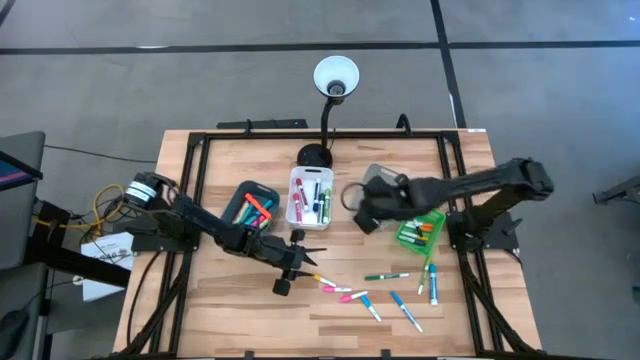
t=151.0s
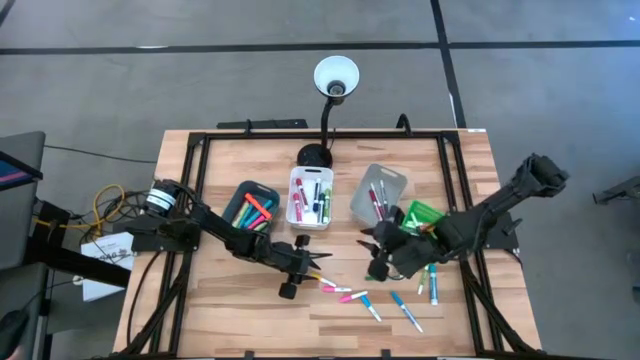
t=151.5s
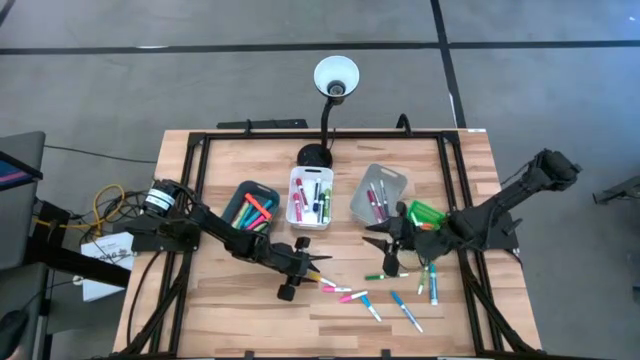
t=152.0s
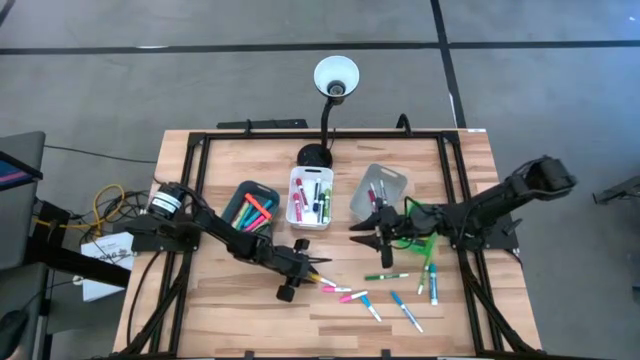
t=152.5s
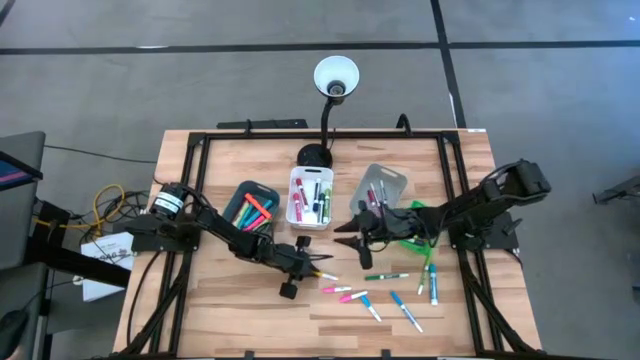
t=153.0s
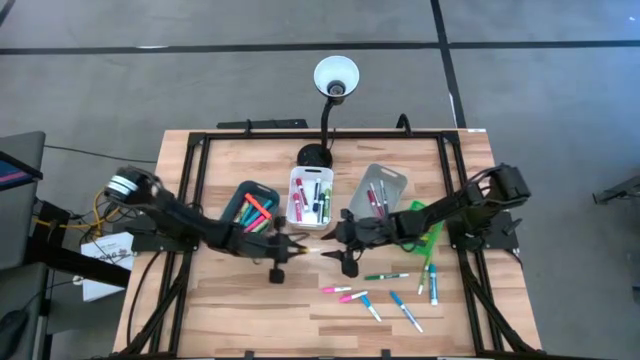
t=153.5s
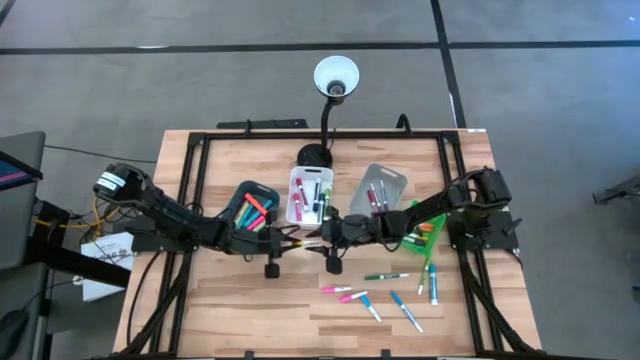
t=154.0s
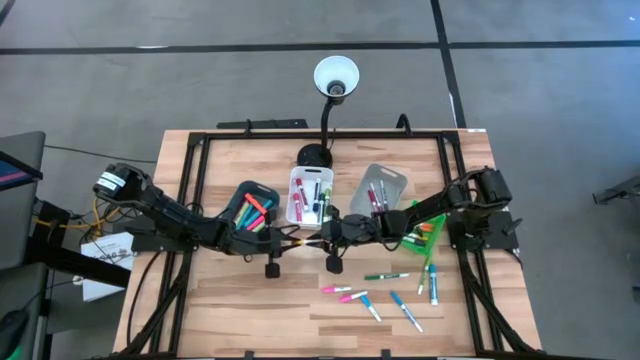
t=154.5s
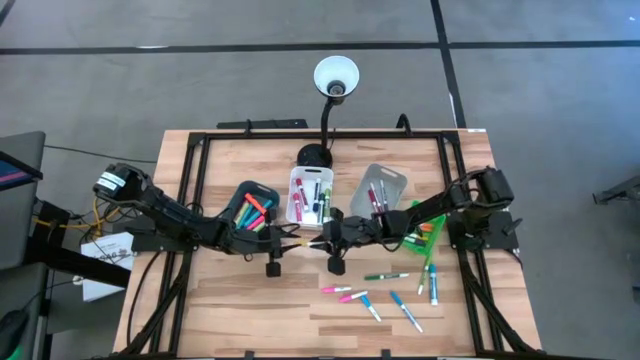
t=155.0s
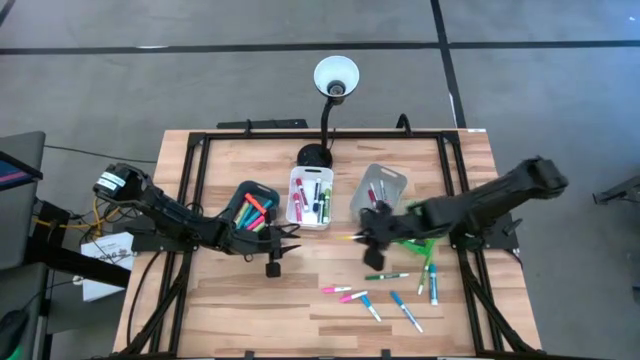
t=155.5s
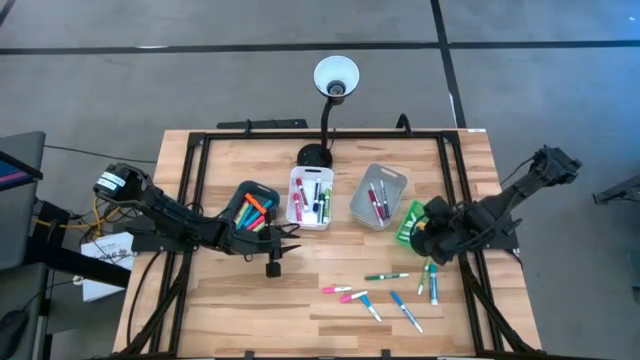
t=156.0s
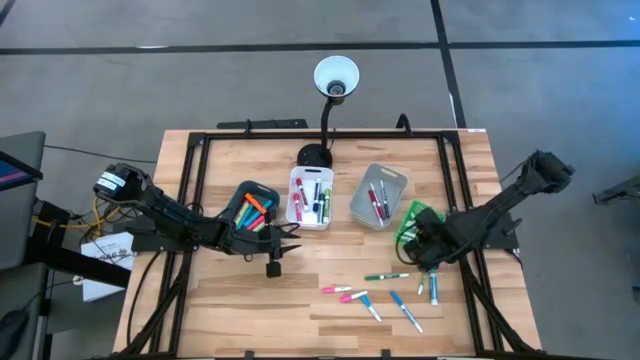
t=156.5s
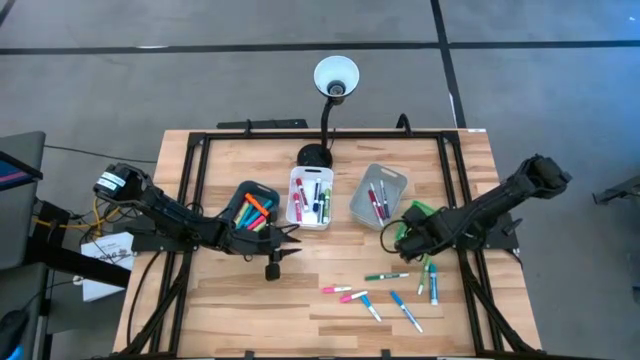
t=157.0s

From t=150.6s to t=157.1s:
Task: Pick & Place Markers
Put the yellow mini marker into the green bin

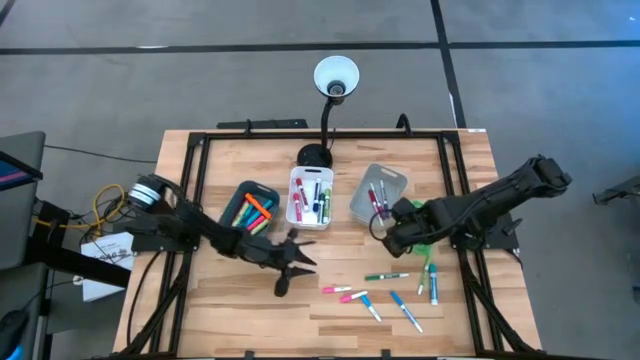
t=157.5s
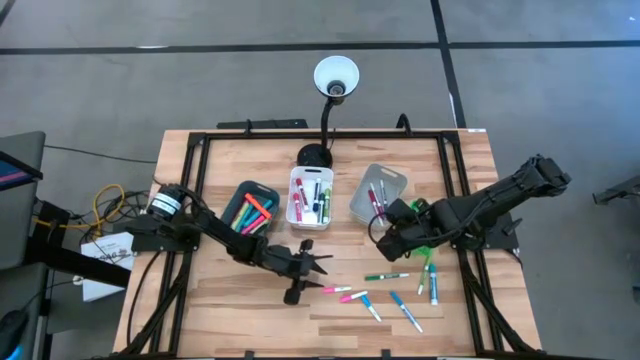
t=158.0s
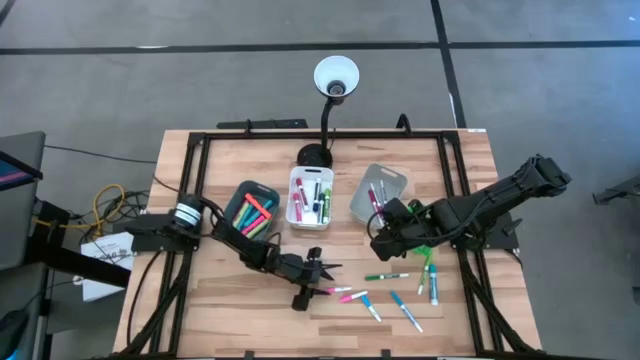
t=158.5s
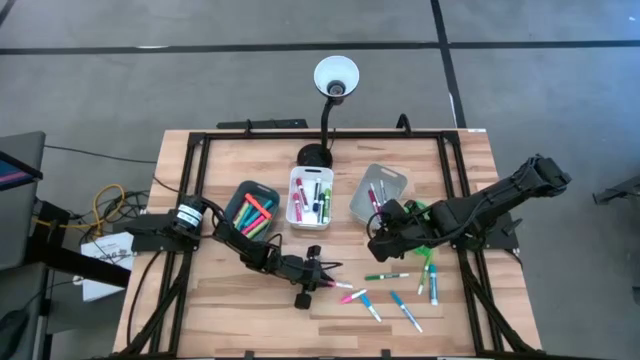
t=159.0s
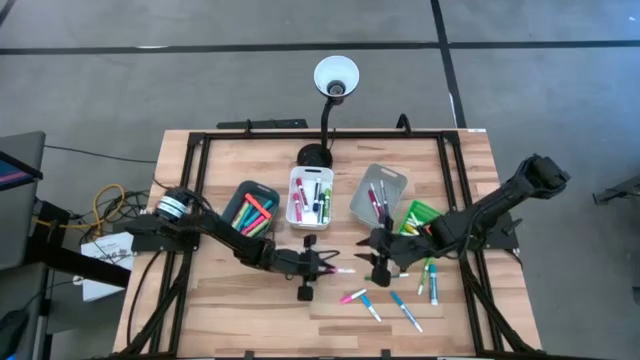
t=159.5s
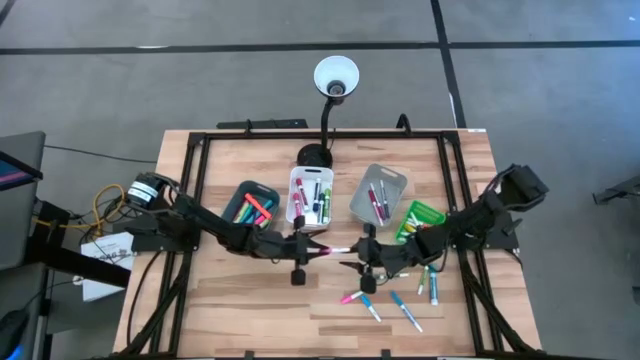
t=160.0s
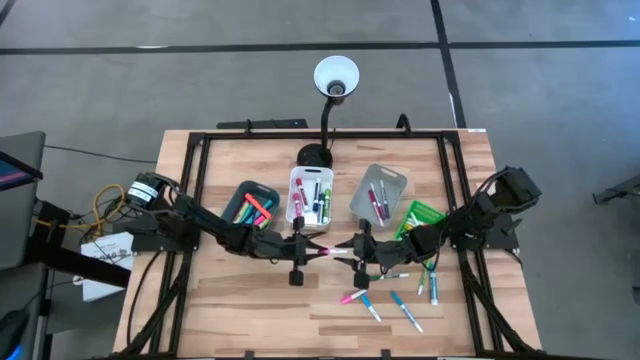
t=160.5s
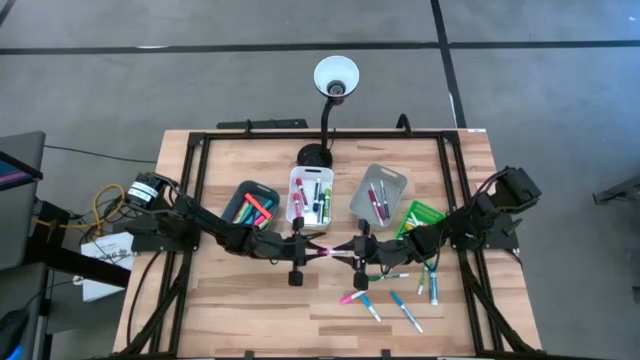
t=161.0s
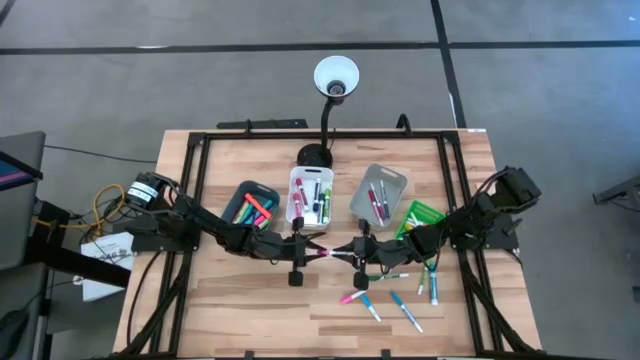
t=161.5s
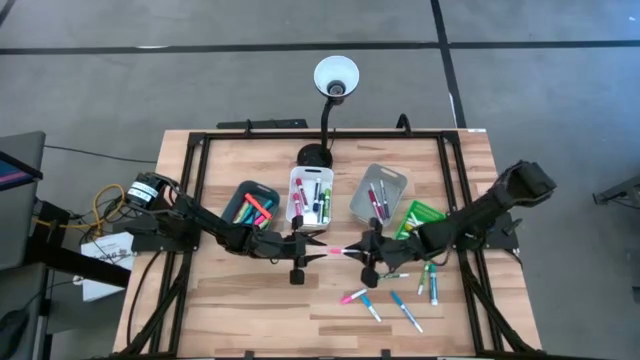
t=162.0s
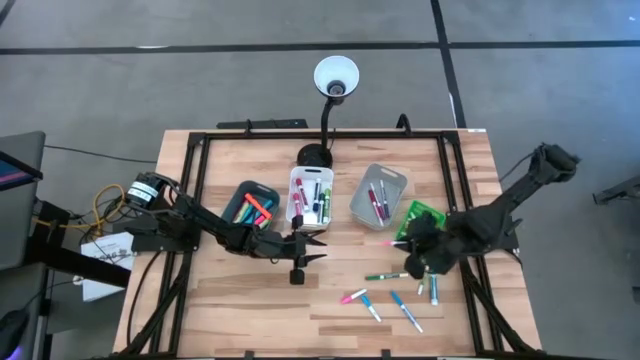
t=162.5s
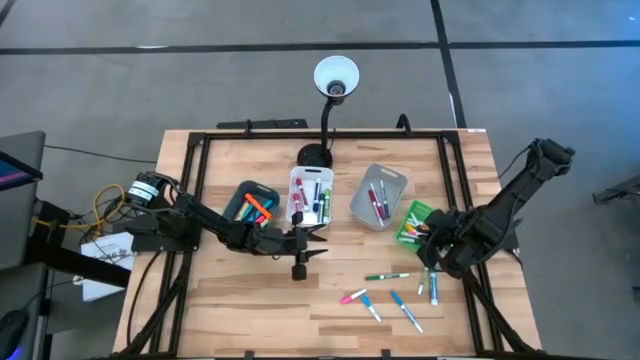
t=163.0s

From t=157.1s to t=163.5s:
Put the top pink mini marker into the green bin

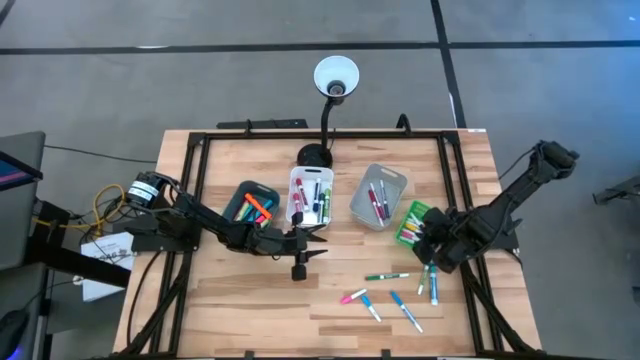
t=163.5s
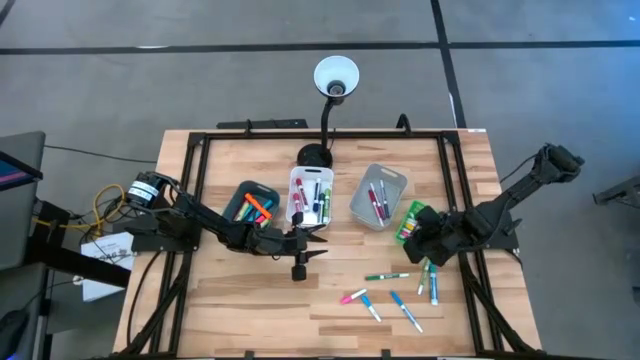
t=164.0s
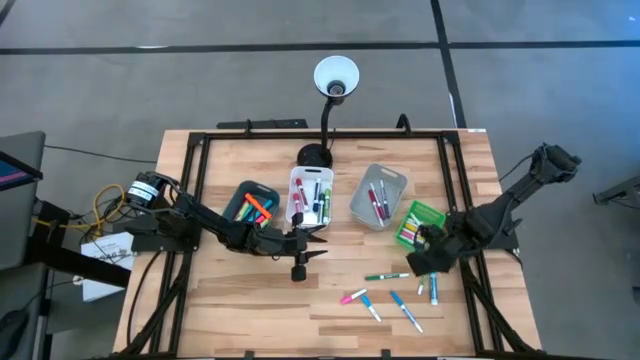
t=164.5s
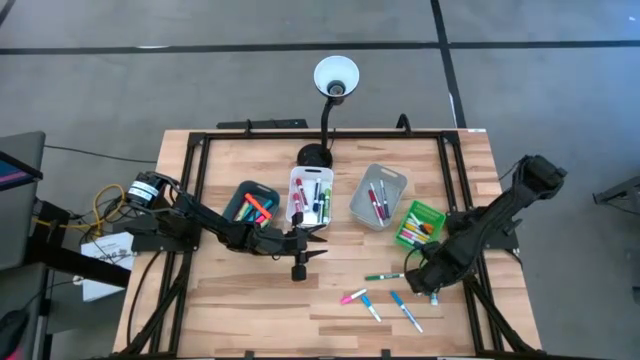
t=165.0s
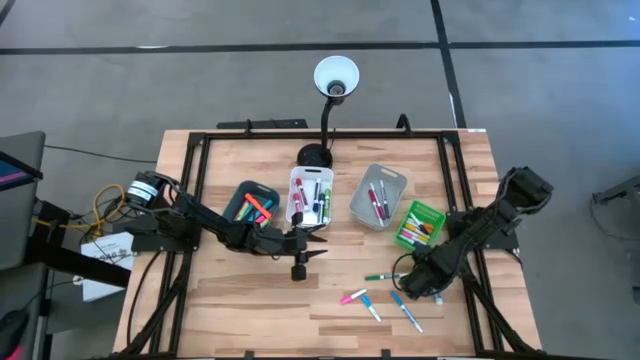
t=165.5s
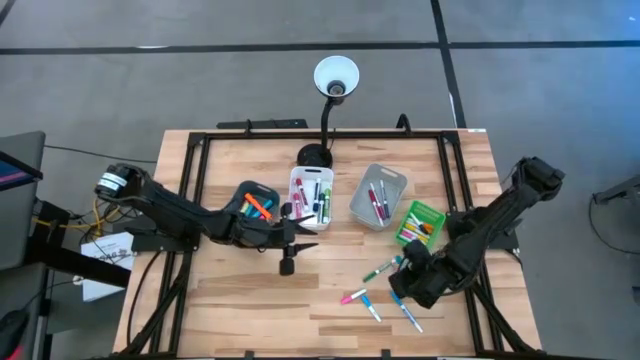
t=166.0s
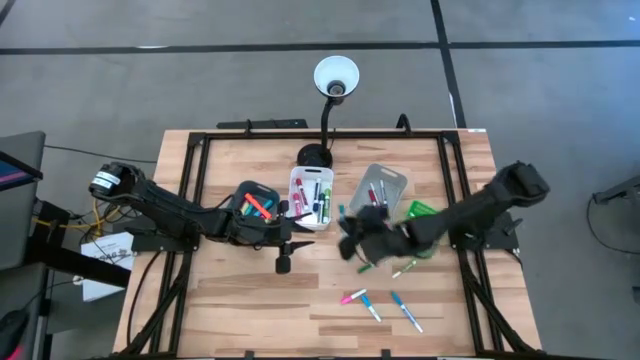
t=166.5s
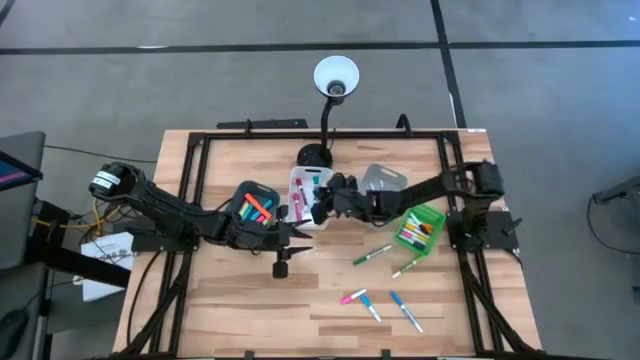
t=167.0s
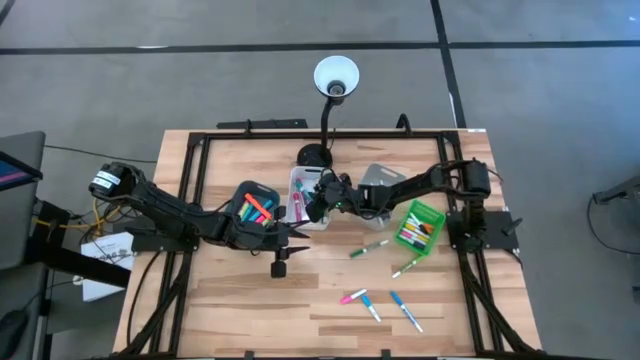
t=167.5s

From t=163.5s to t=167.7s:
Put the light blue dry erase marker into the white bin

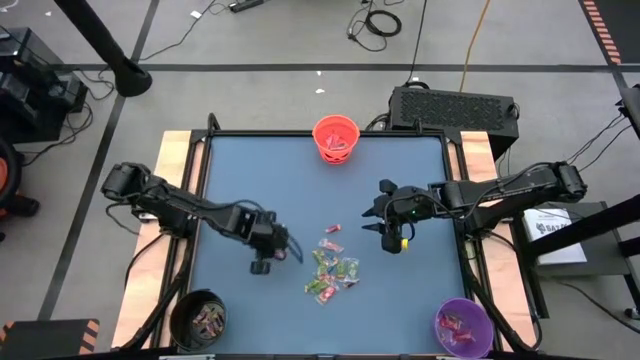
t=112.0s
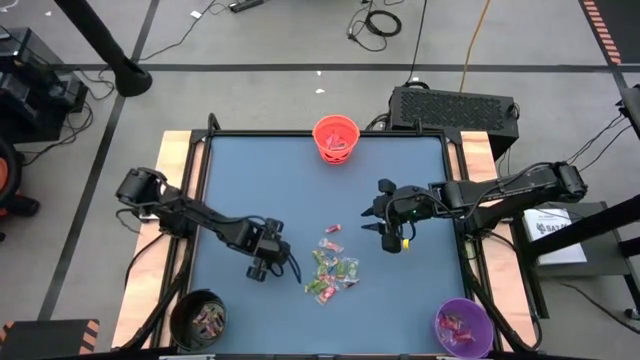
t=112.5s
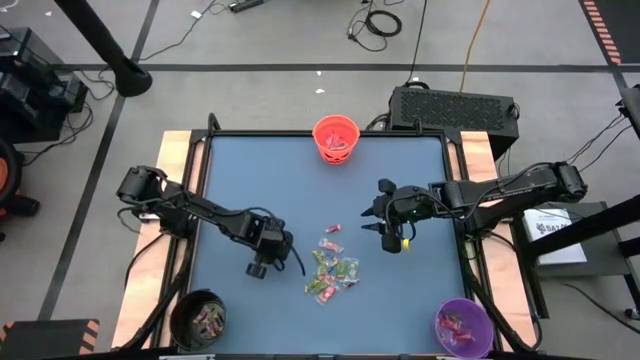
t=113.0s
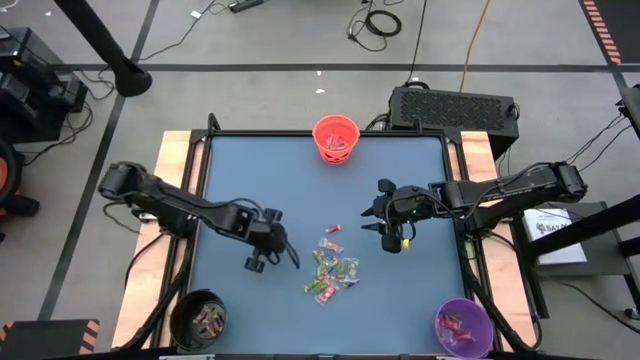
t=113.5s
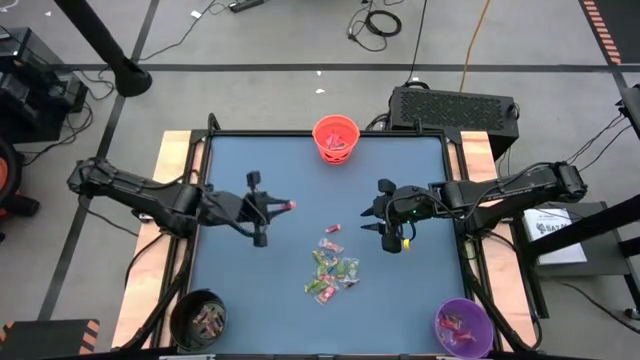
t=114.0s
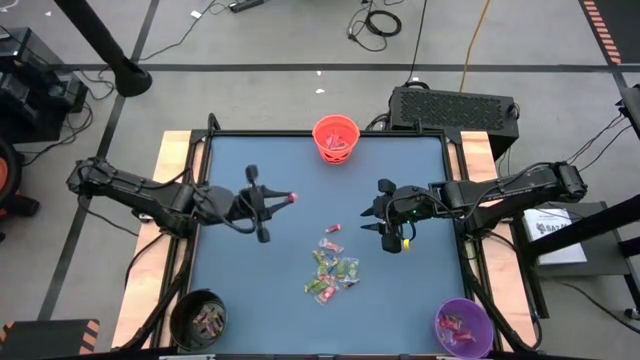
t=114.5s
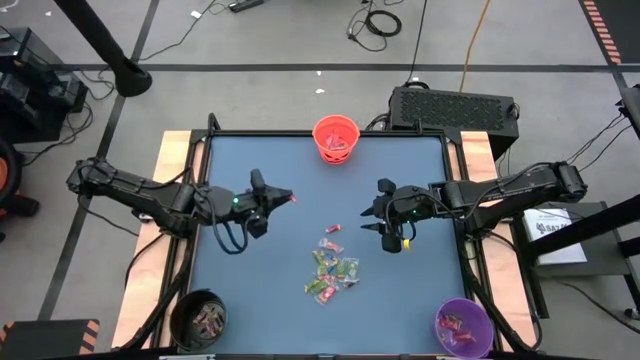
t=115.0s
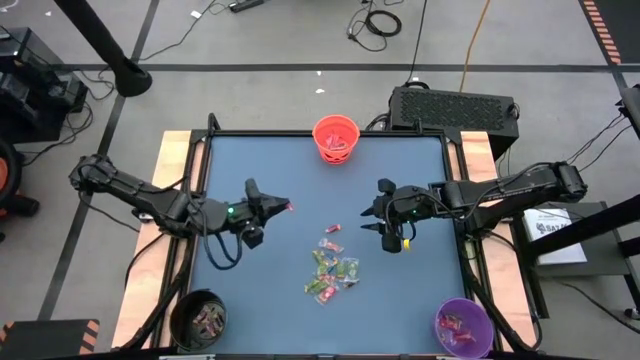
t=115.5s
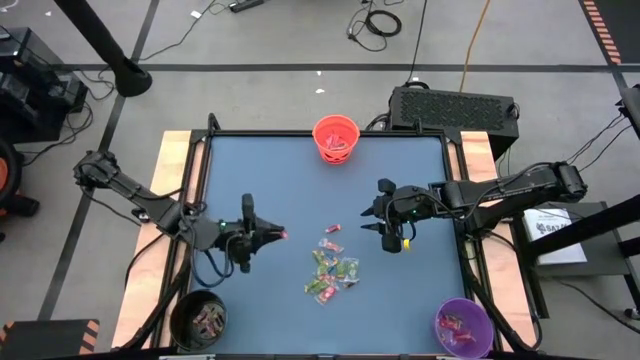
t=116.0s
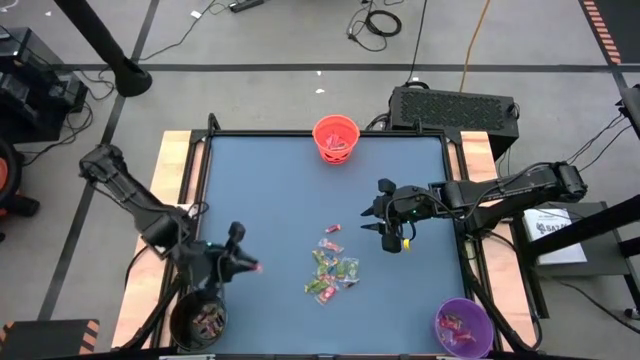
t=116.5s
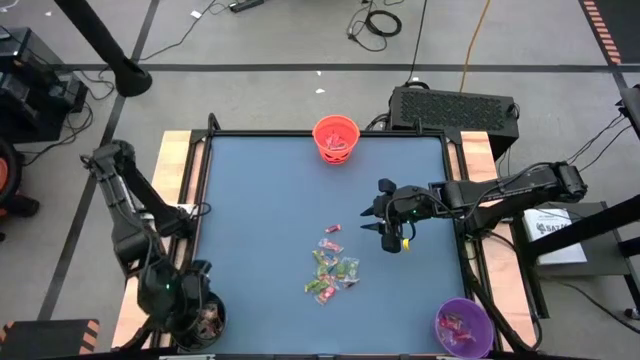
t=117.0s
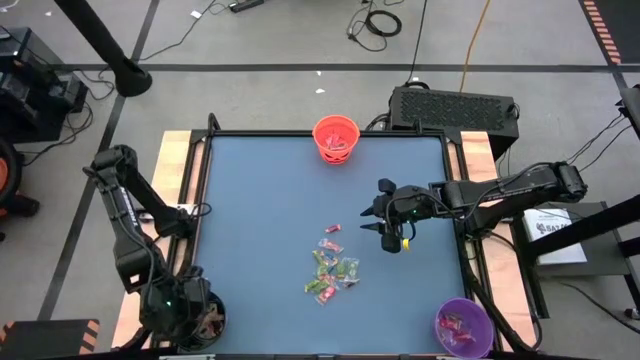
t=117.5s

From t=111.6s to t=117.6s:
Task: Sort candy by brand, put in halloween buckets
Put the orange candy into the black bucket
